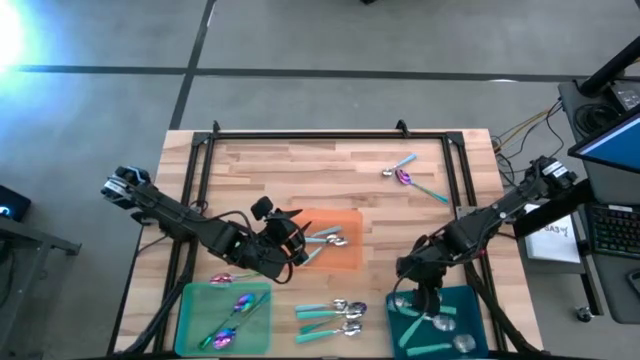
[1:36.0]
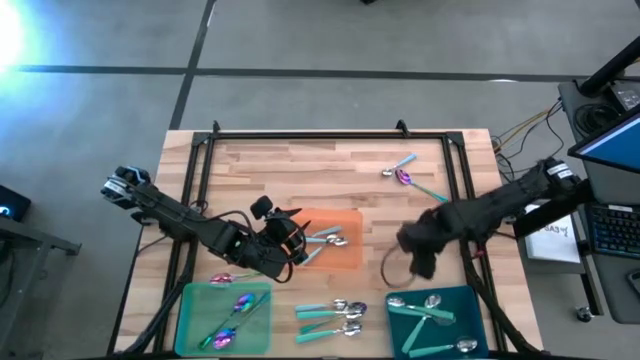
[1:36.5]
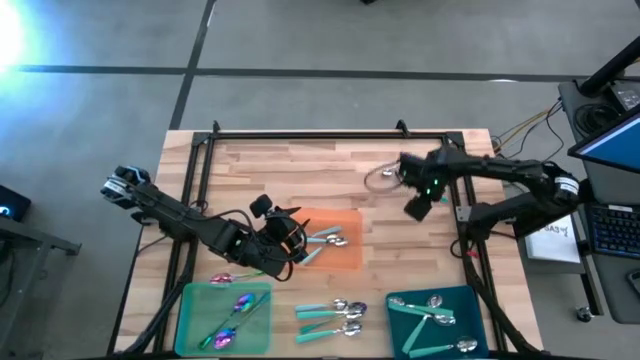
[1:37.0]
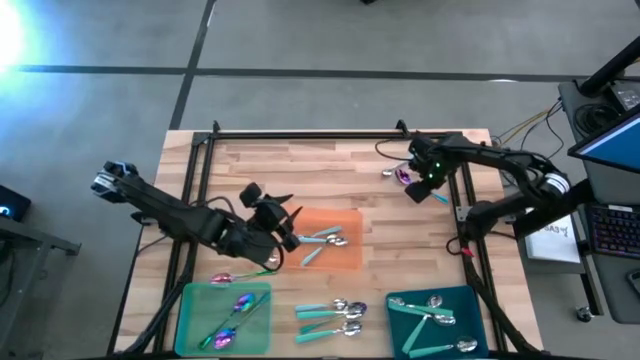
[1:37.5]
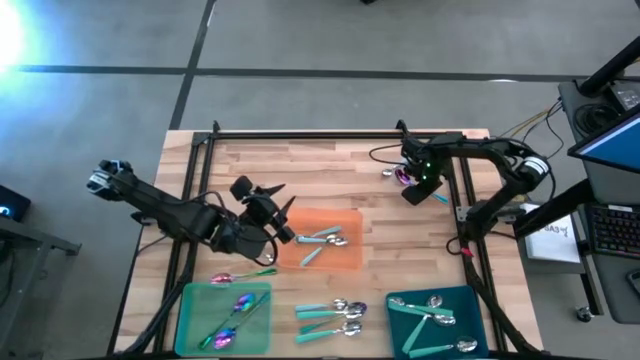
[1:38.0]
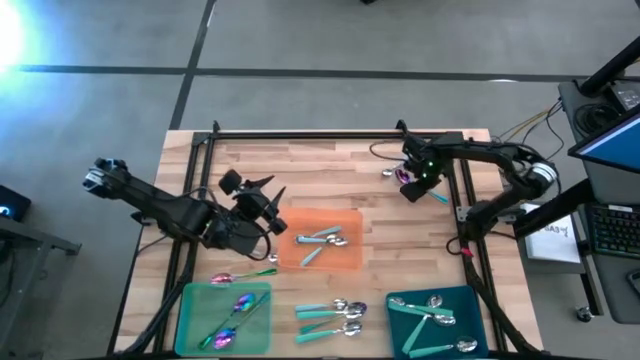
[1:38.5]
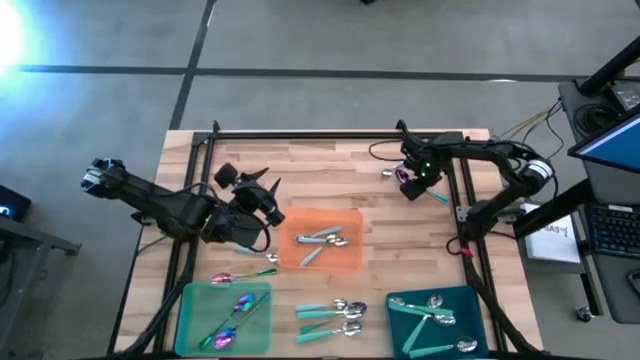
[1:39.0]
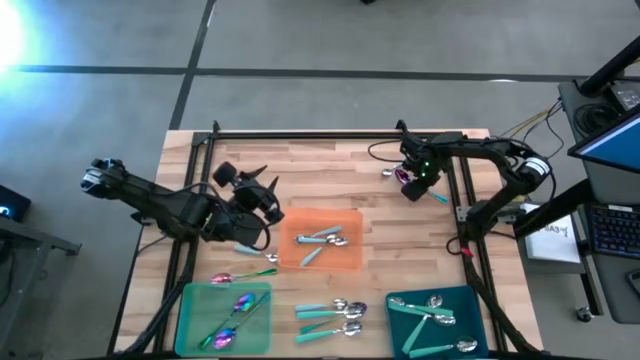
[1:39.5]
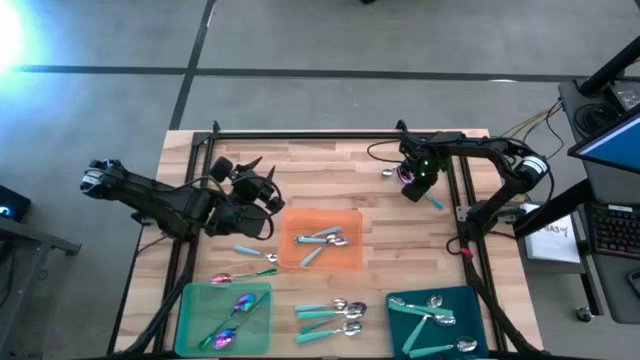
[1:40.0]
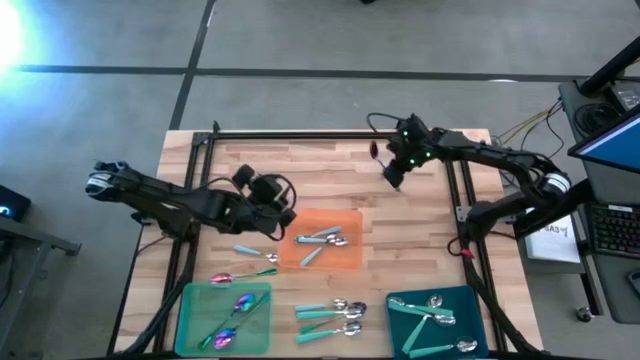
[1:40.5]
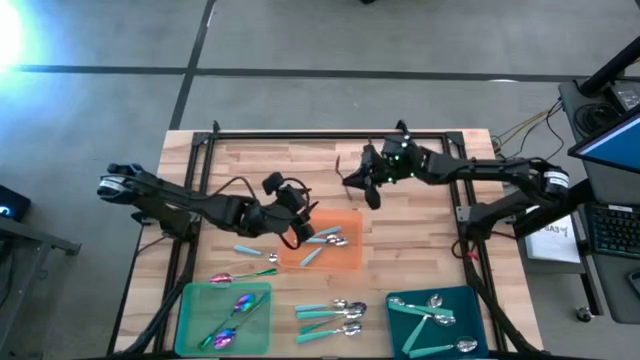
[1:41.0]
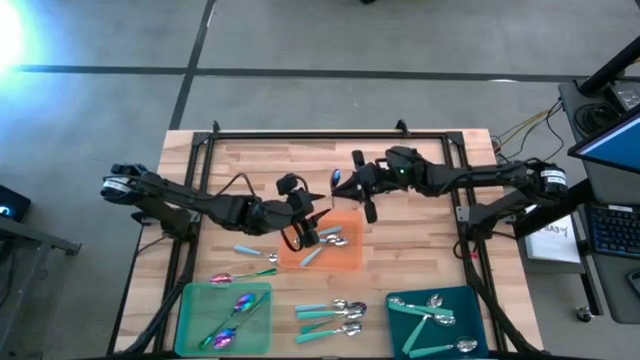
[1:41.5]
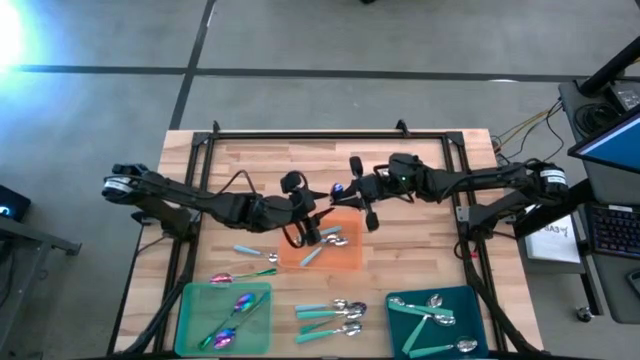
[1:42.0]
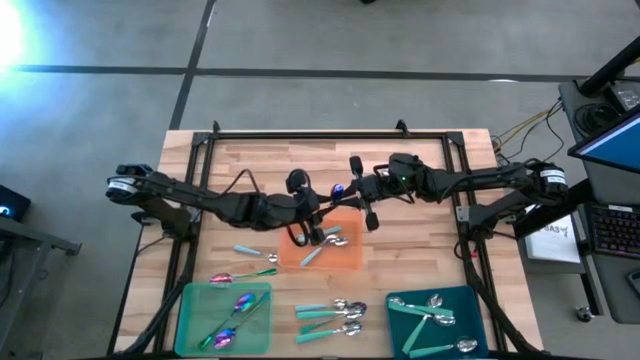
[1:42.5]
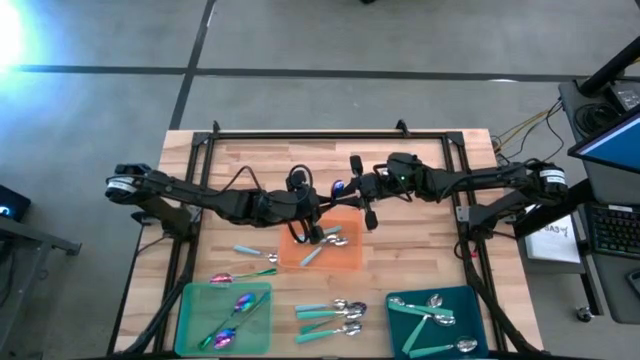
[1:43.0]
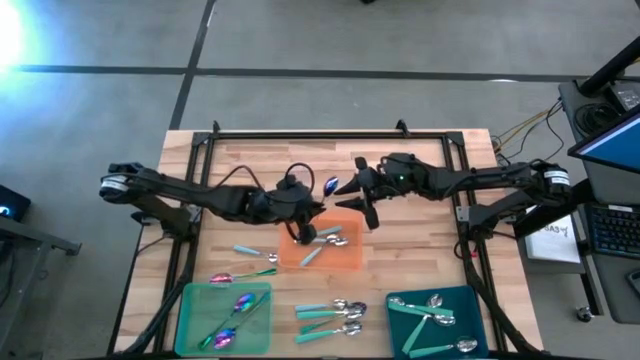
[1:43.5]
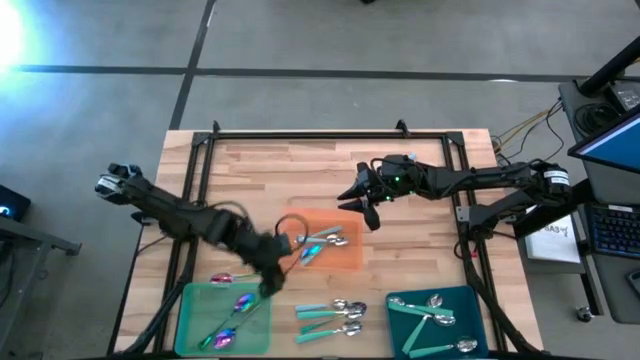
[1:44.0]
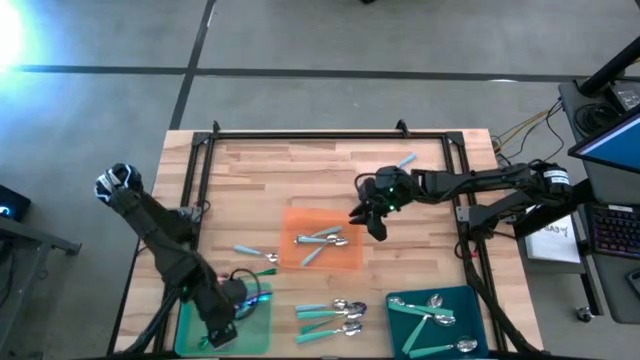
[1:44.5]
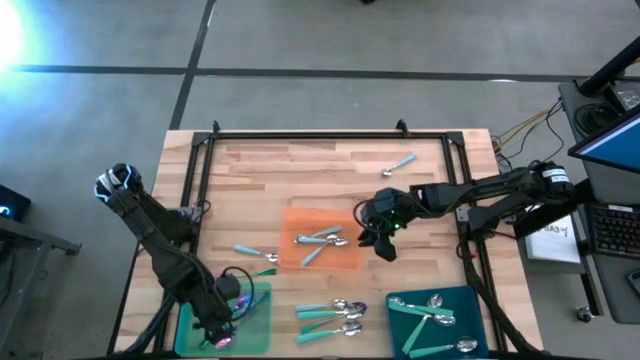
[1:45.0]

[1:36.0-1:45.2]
Task: Sort silverware by color (type)
Put the violet spoon into the green bin

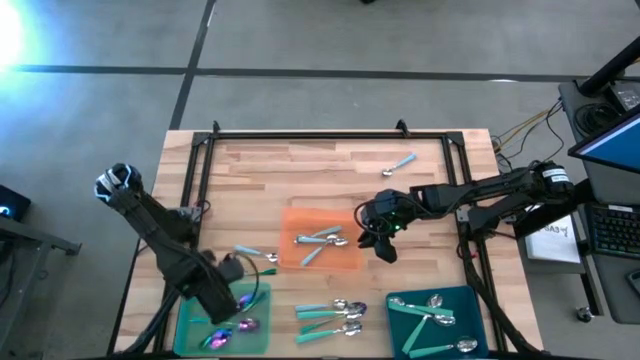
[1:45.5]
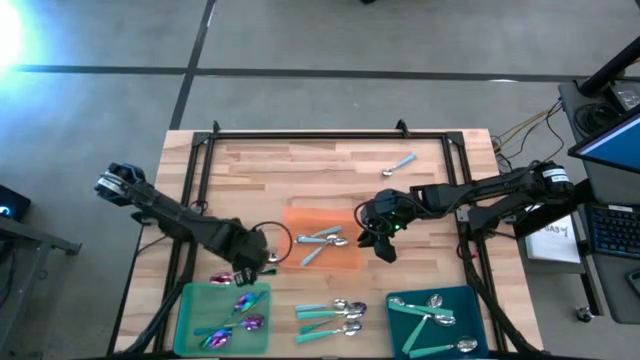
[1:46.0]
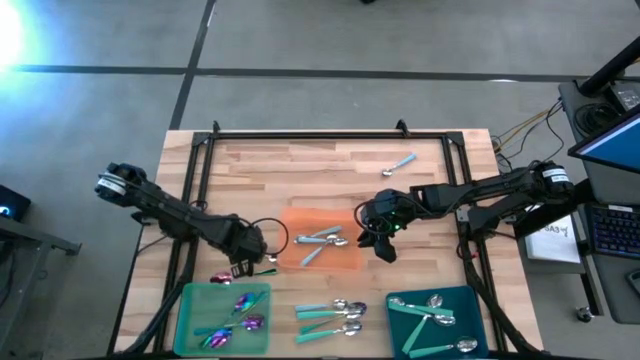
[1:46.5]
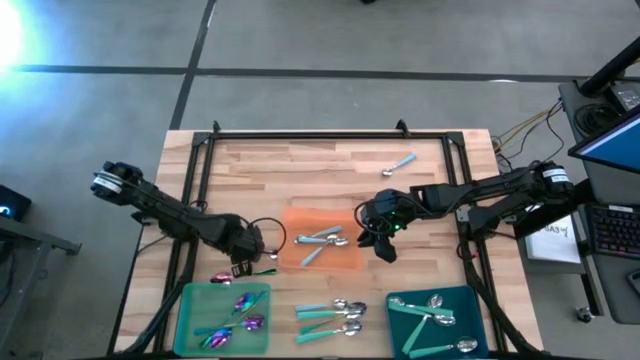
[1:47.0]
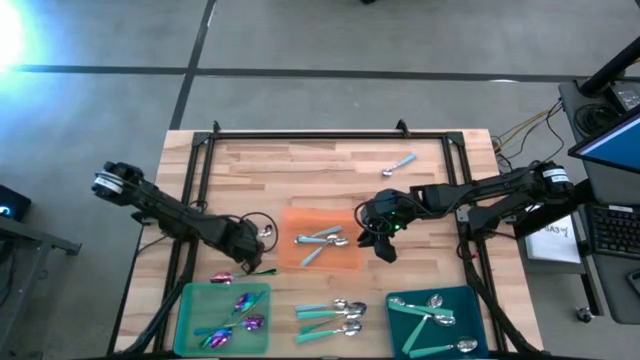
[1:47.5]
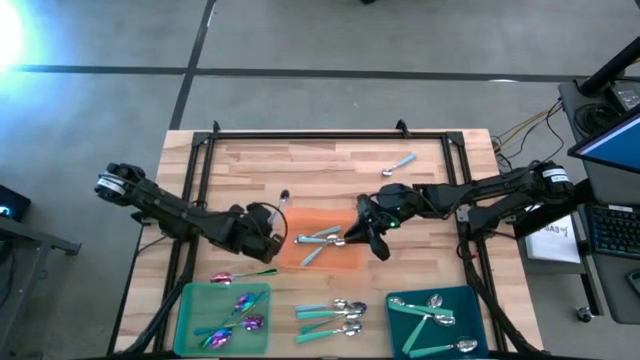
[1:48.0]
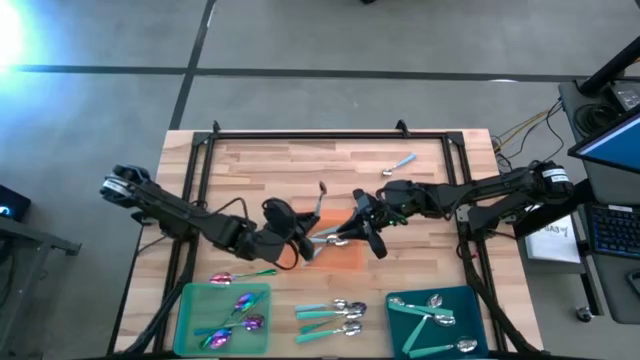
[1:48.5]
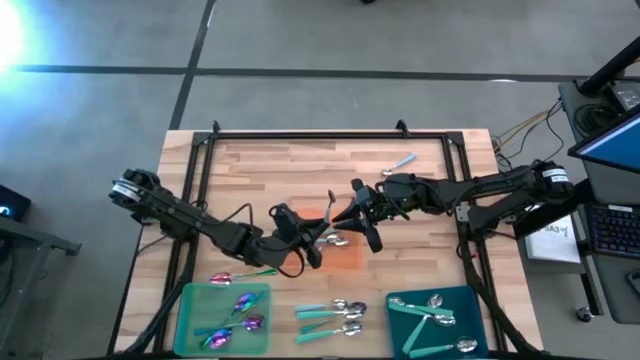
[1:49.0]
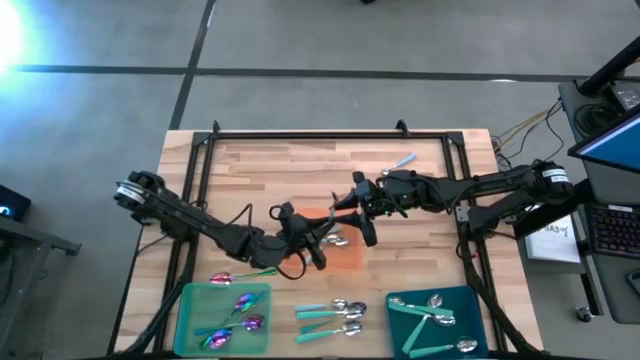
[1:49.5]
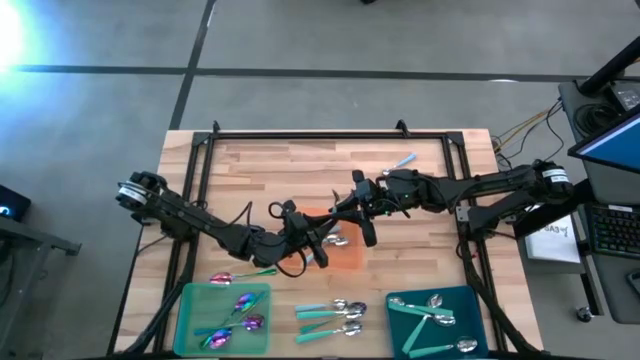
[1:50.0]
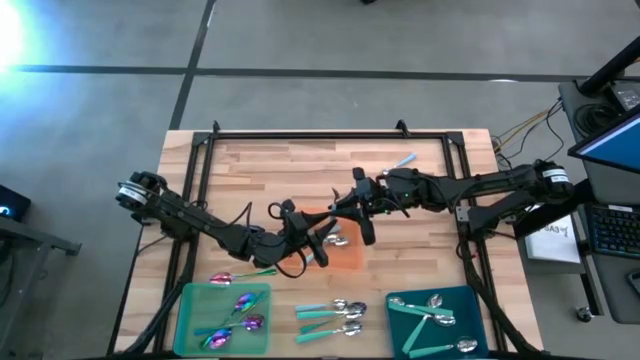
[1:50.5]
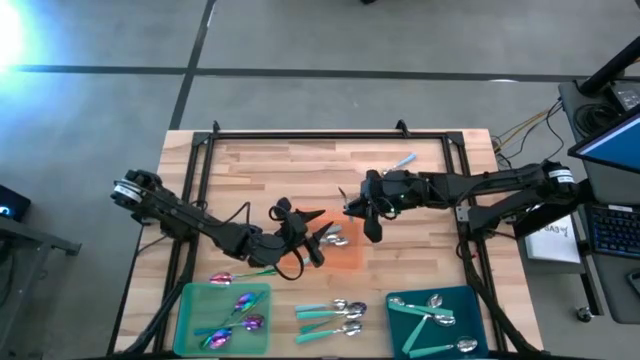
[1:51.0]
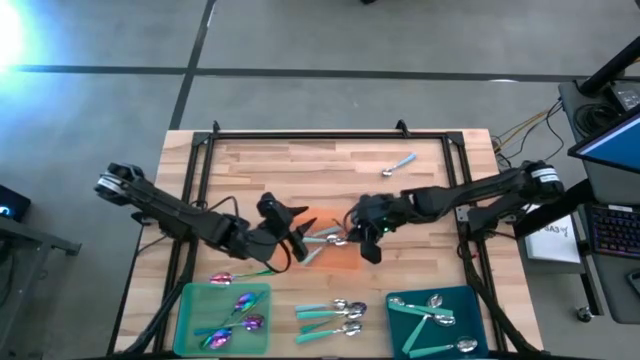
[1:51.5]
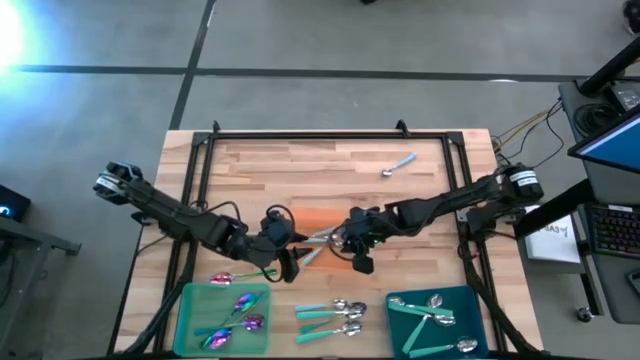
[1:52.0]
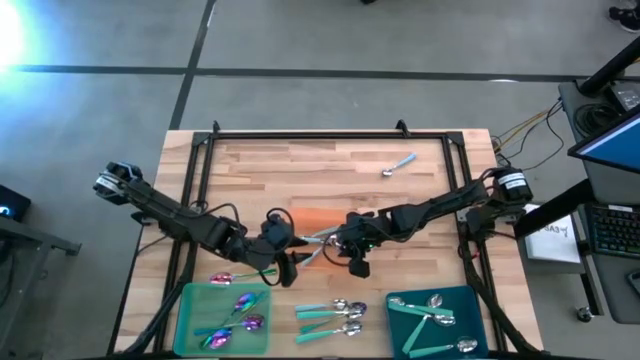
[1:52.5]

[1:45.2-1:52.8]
Put the blue spoon into the orange bin

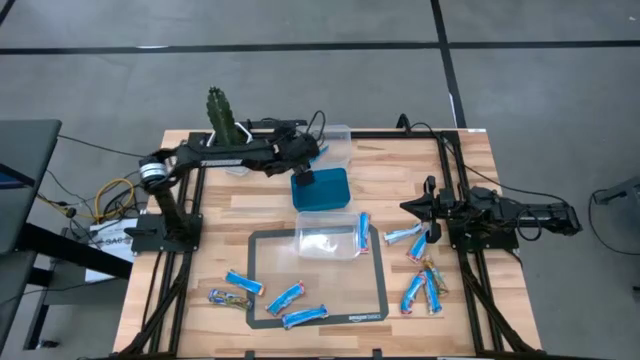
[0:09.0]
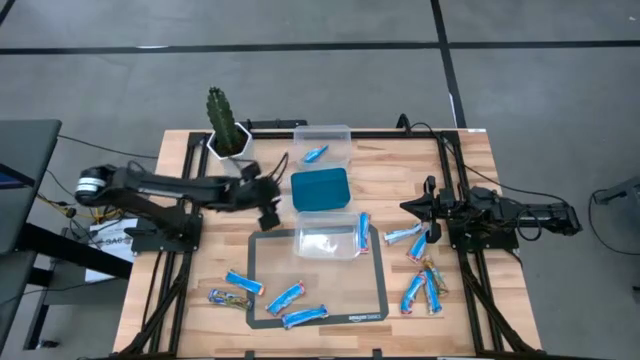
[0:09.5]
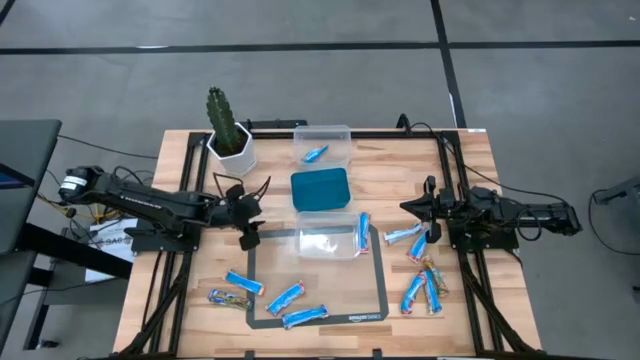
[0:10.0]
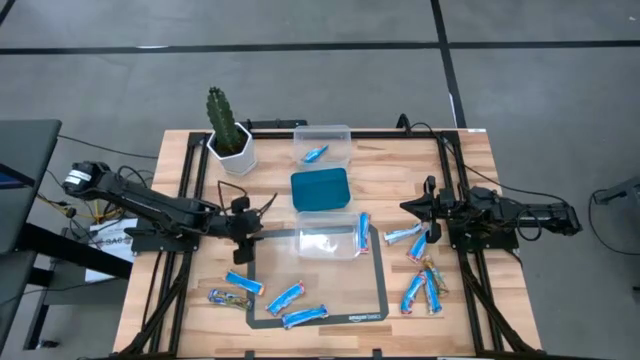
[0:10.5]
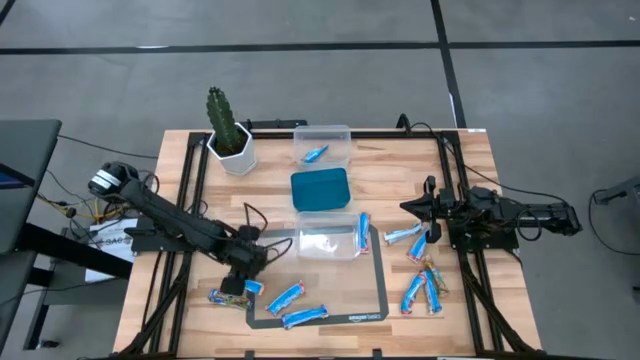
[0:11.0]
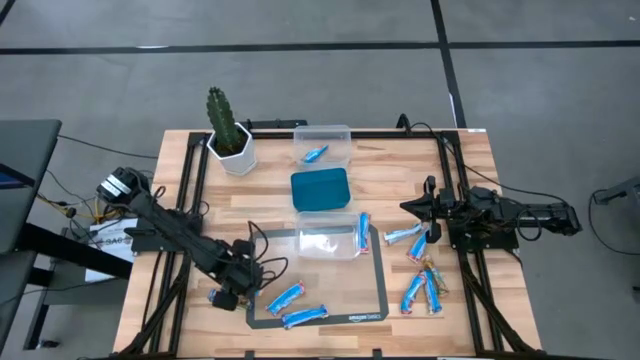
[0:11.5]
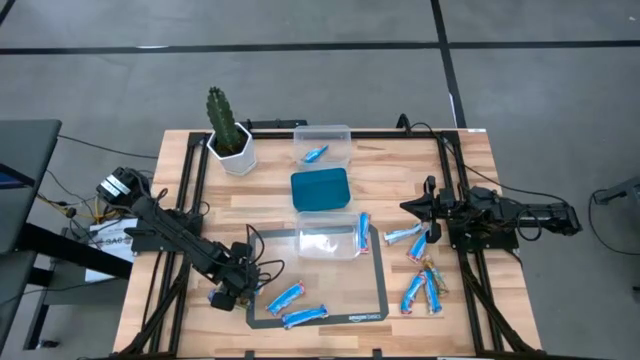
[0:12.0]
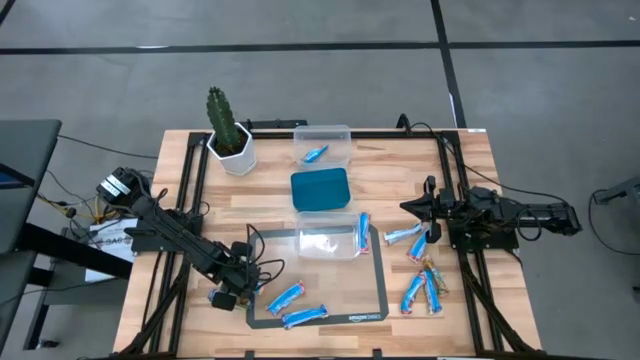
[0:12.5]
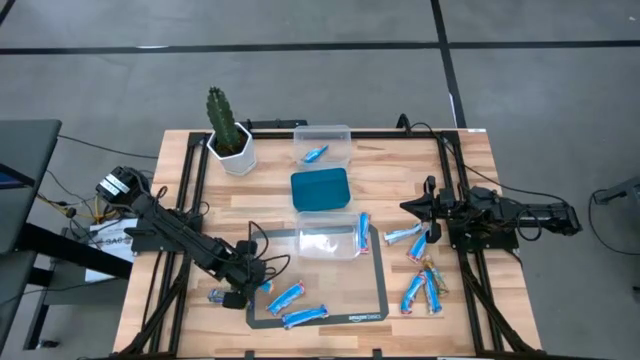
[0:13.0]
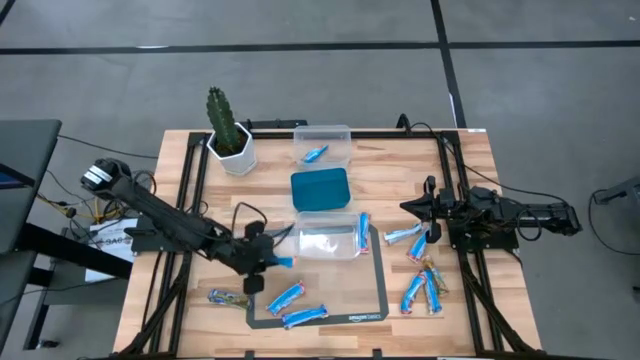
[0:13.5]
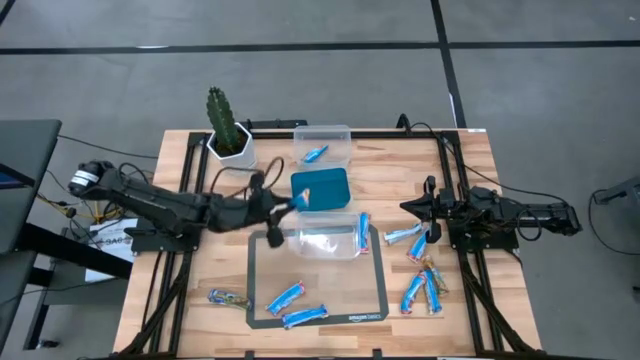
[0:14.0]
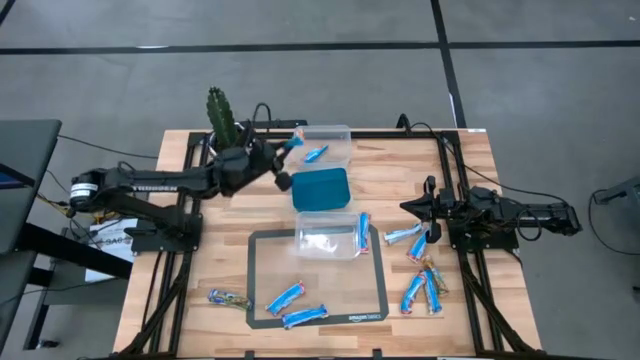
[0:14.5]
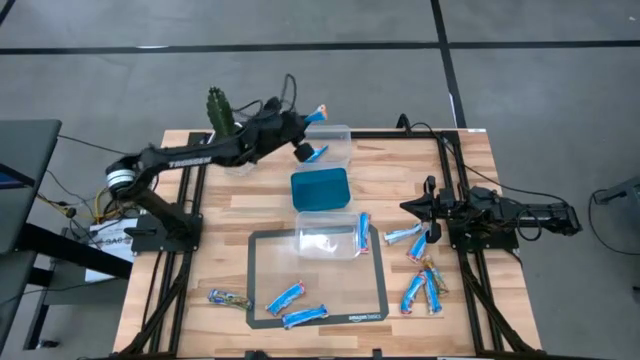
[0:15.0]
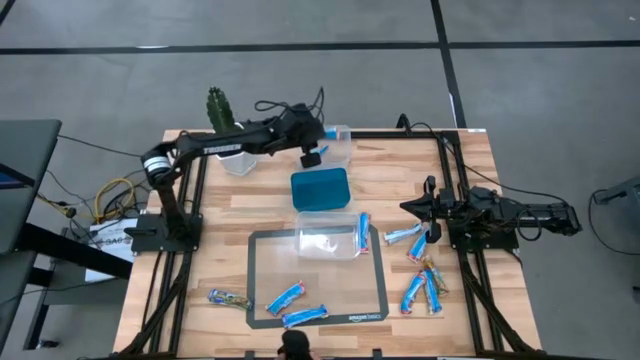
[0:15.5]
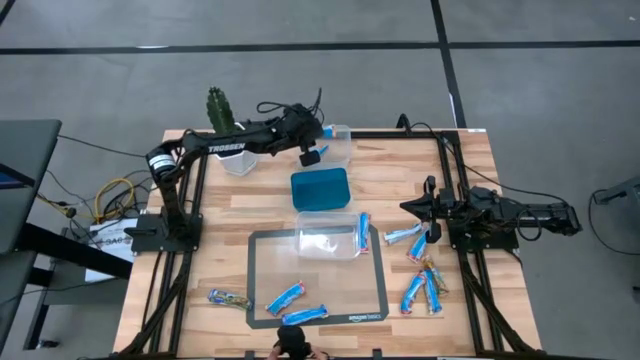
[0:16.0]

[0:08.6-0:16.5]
Task: Pick and place Granola Bars by type
Put the left orange granola bar into the top transparent bin
